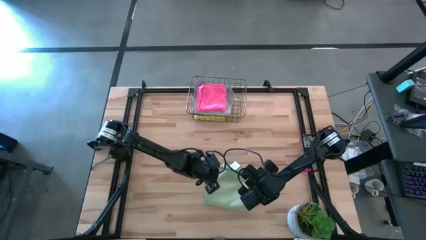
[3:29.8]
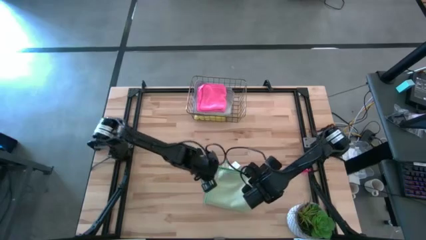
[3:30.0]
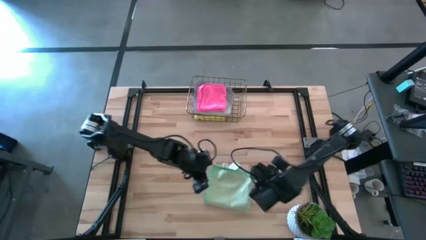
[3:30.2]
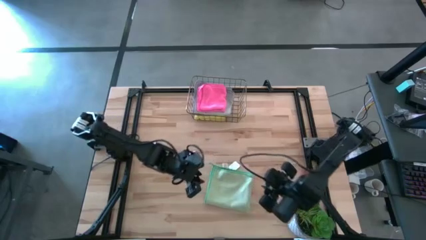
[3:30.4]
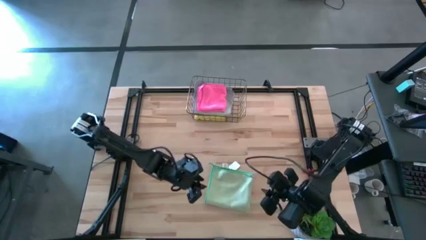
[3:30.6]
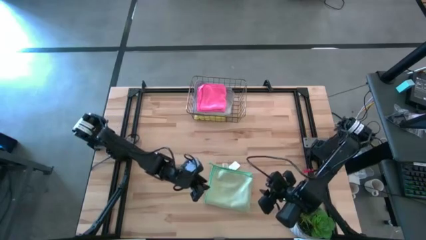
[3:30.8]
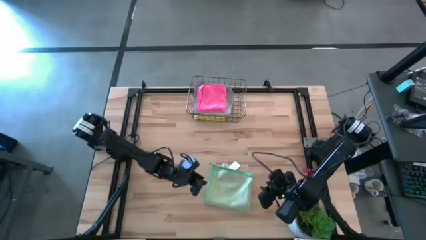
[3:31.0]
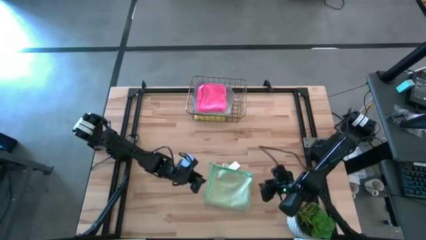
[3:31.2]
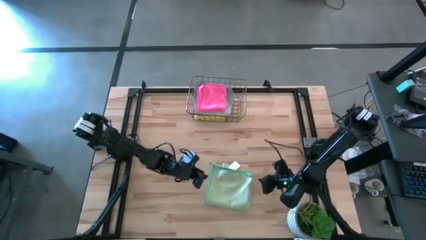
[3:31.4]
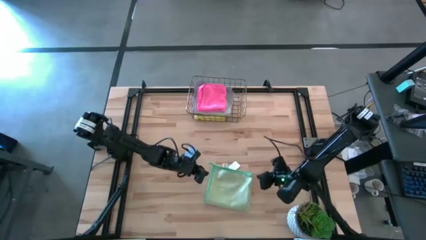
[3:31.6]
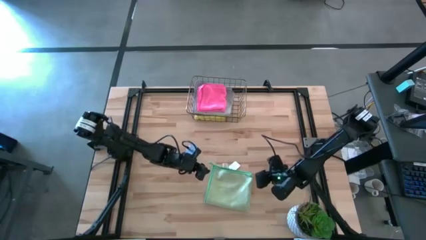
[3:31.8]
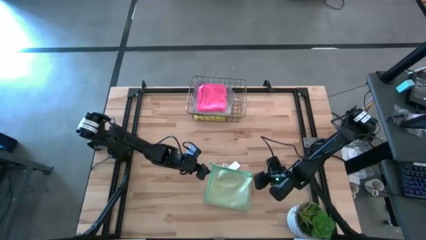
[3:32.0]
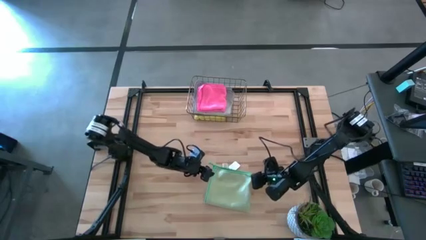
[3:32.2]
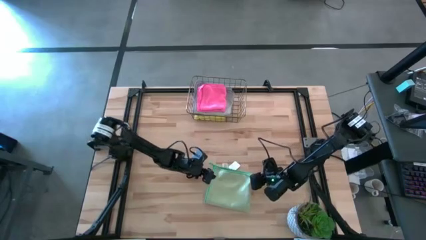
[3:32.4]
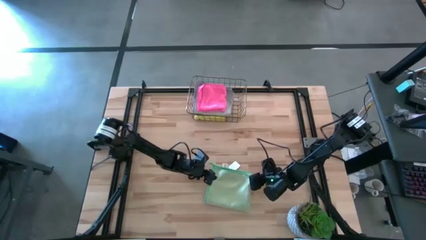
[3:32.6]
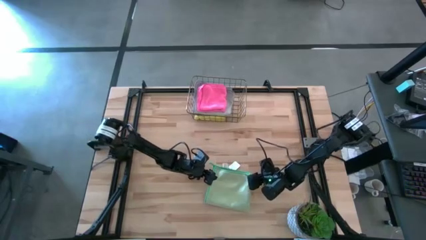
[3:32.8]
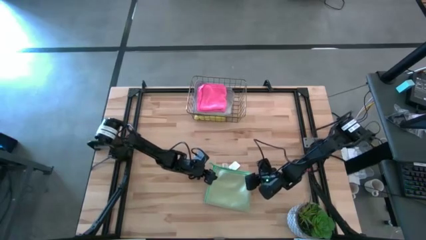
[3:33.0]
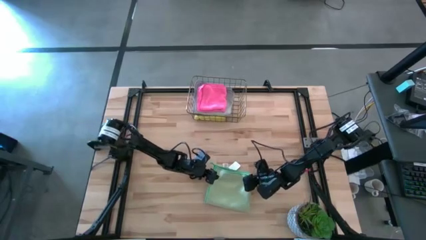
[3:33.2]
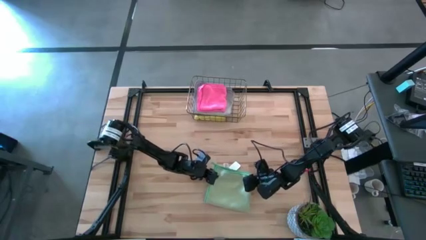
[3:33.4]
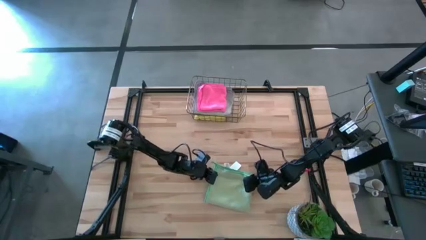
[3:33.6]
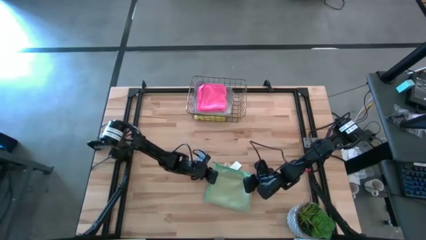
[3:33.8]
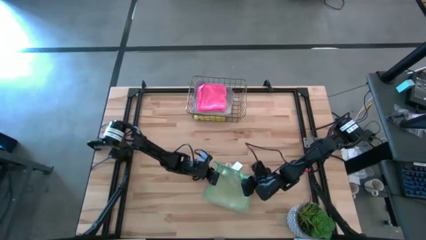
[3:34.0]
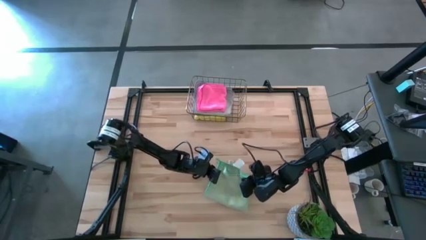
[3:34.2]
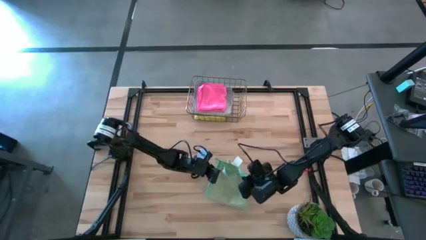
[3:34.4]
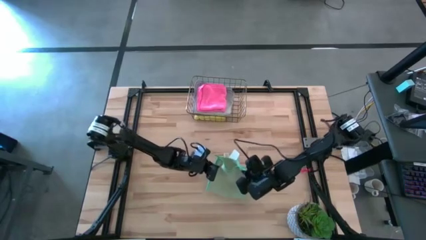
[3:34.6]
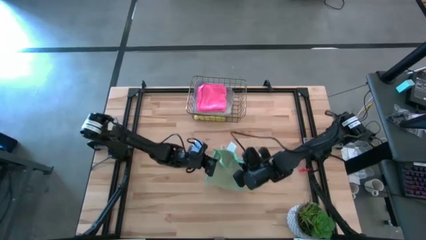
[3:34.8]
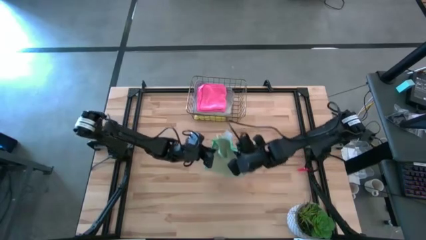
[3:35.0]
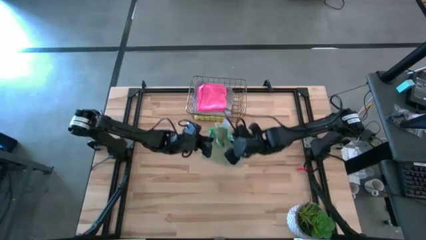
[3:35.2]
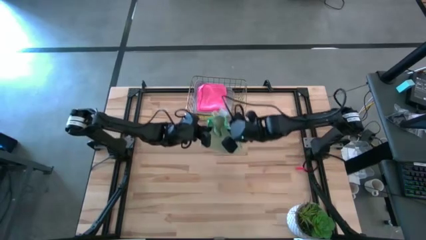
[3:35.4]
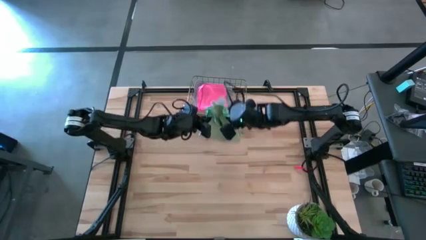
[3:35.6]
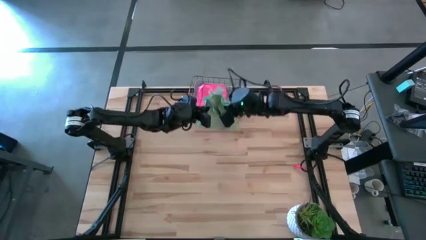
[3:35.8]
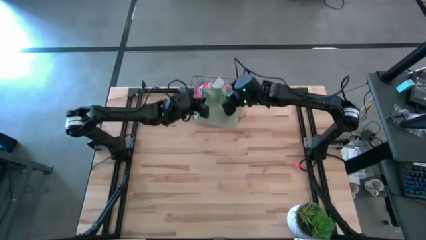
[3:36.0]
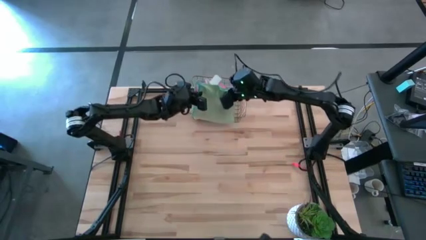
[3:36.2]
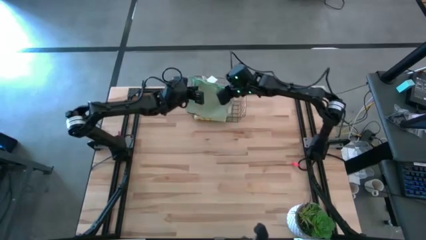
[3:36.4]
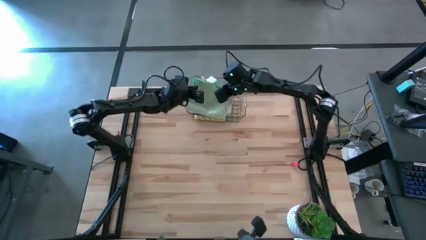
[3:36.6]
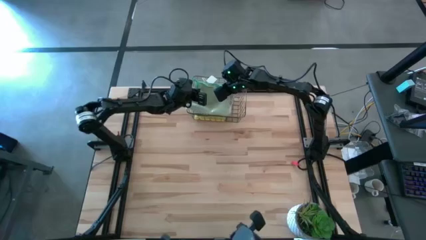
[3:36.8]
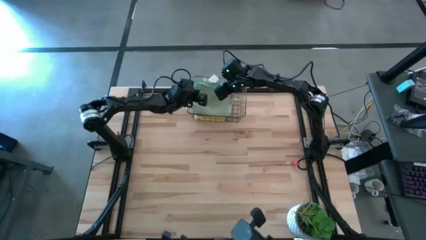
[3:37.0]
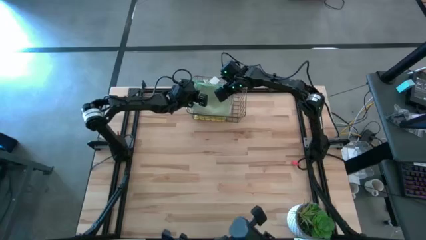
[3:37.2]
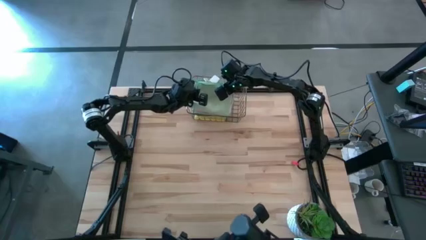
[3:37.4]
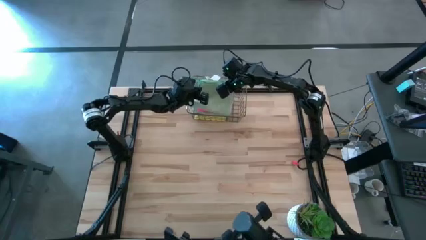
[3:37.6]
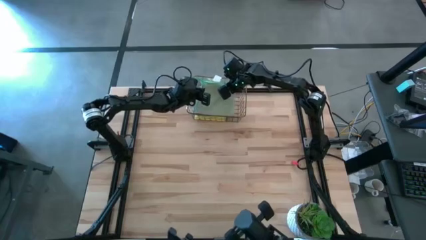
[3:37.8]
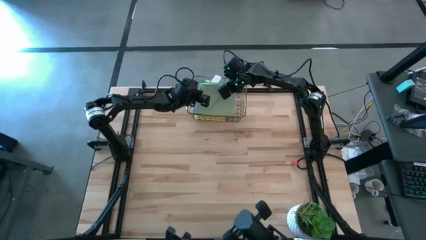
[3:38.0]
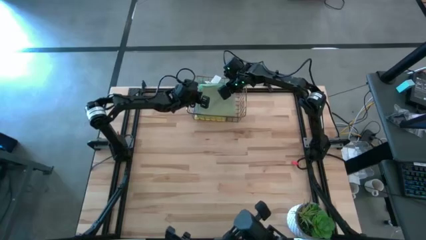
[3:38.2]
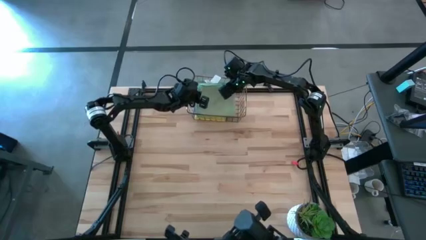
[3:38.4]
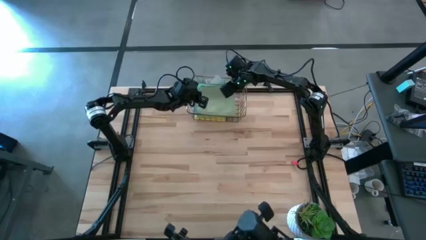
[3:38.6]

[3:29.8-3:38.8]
Task: Fold microfiber towels
Put the blue towel into the wire basket

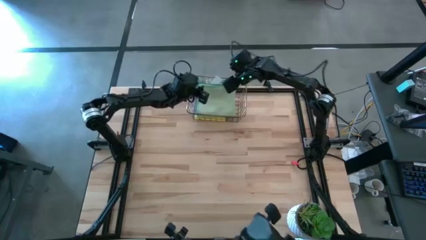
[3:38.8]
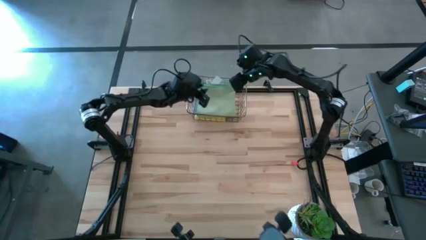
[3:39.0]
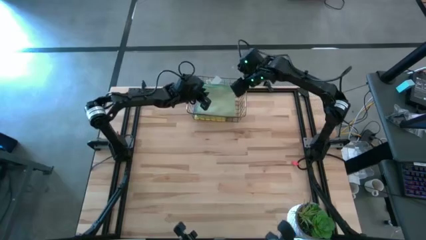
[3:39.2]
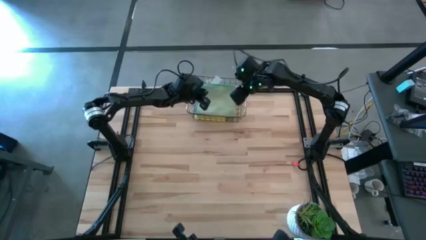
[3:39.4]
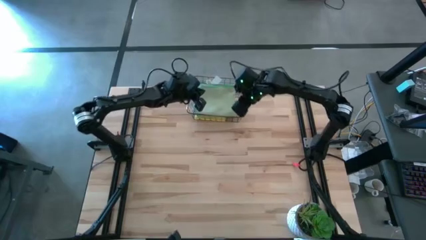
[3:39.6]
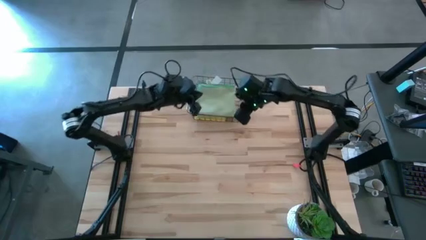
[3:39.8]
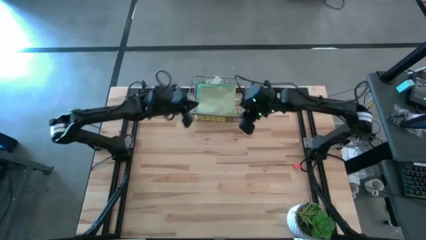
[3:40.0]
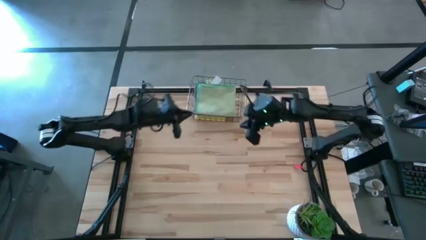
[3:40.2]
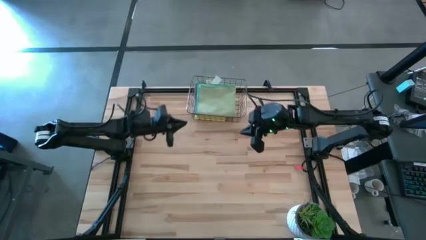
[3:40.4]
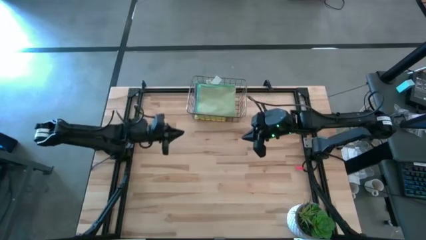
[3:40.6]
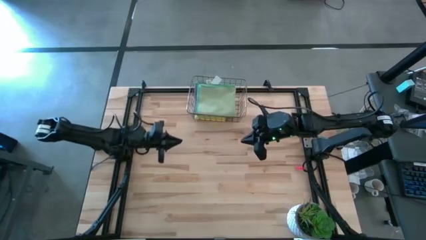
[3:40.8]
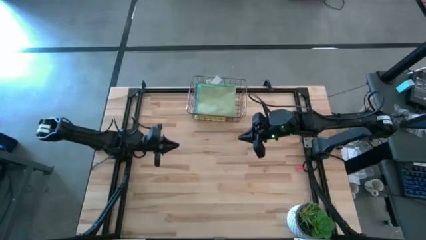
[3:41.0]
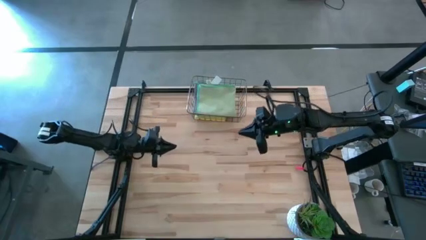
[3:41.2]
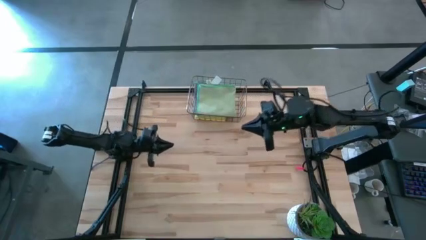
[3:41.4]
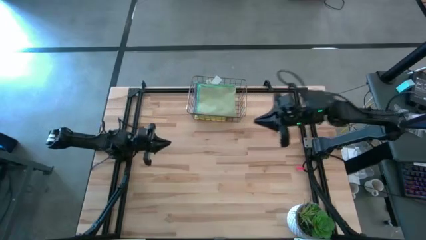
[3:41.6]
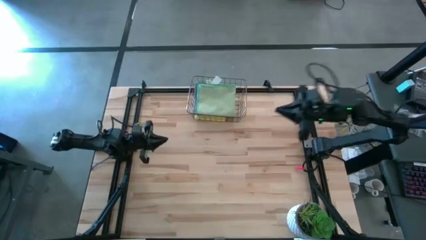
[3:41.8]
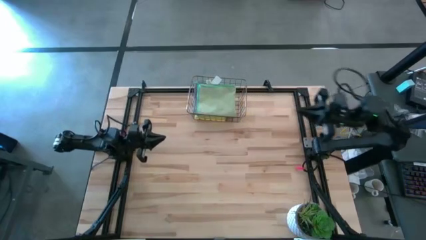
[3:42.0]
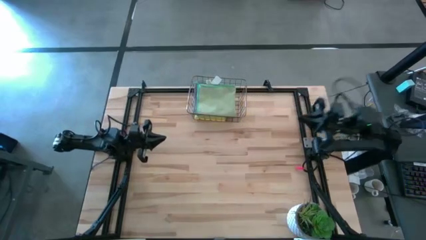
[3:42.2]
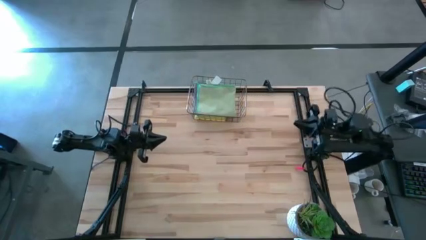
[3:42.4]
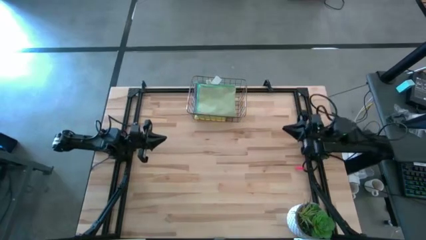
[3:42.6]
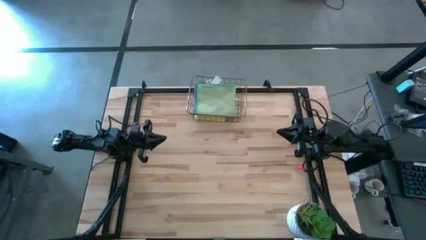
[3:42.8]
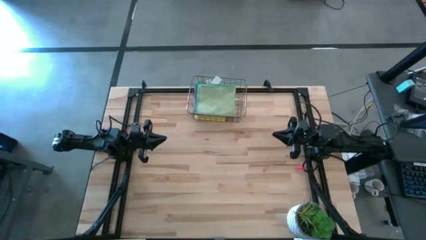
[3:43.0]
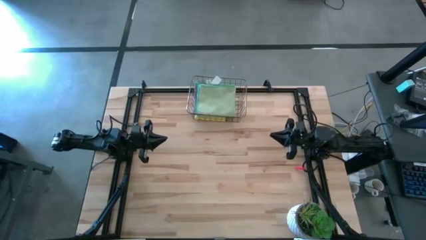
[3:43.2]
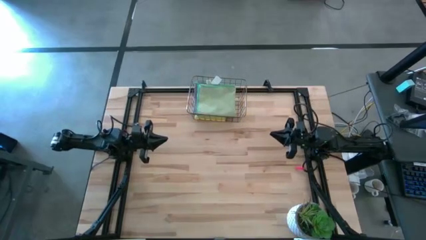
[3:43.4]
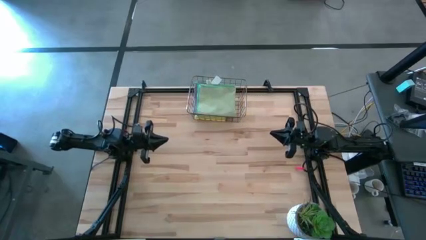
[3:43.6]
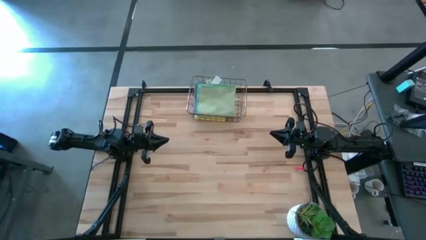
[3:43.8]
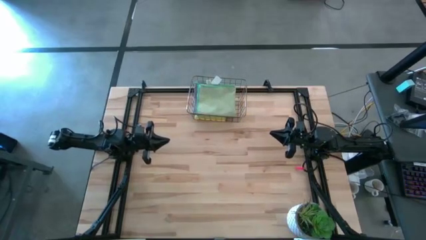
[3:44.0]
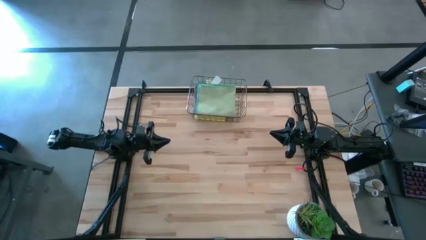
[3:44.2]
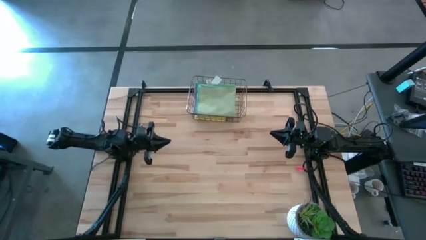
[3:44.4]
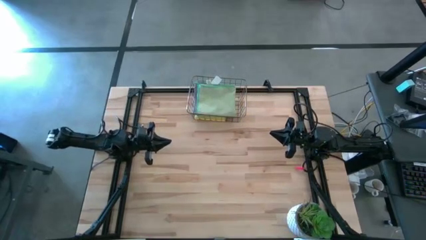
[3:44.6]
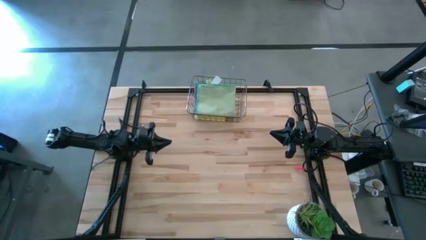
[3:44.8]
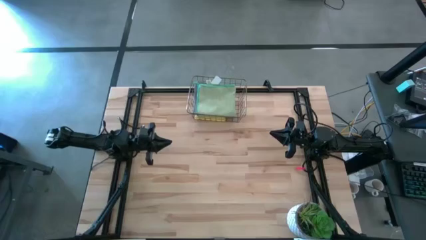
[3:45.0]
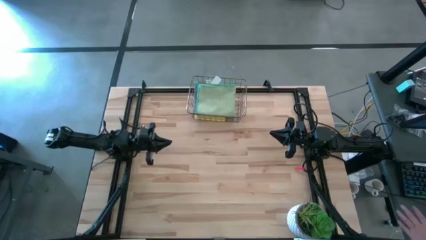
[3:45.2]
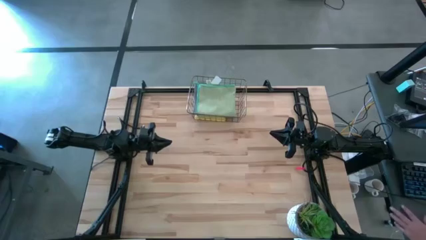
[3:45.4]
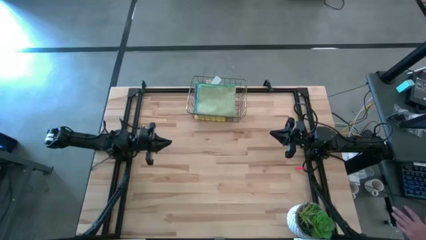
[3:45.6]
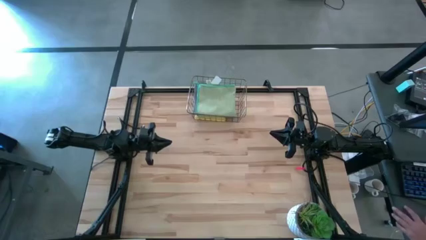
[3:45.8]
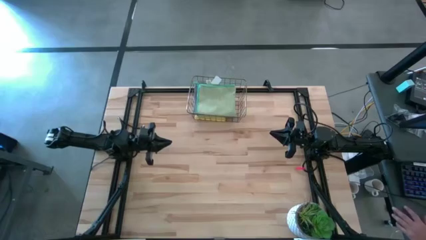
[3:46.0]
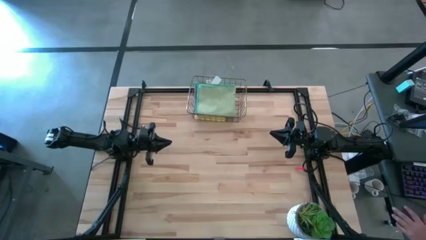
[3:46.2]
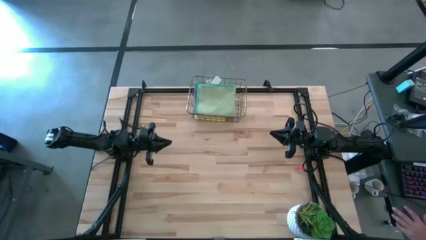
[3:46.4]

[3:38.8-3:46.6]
Return to Home Position
